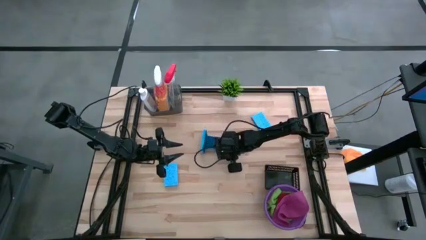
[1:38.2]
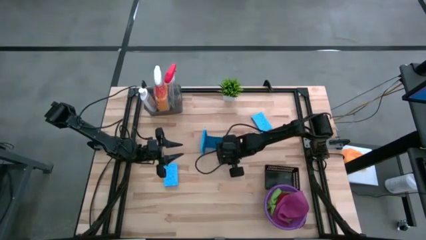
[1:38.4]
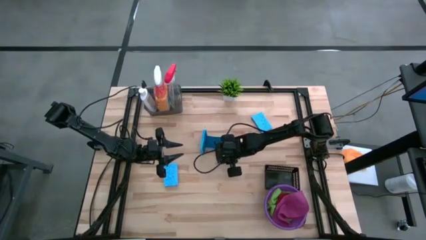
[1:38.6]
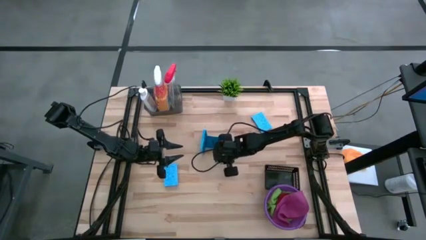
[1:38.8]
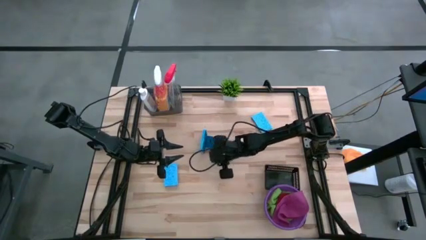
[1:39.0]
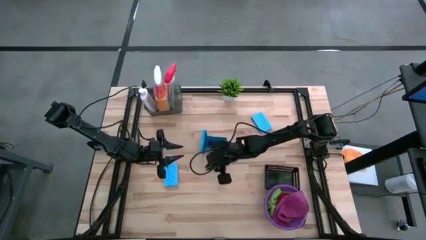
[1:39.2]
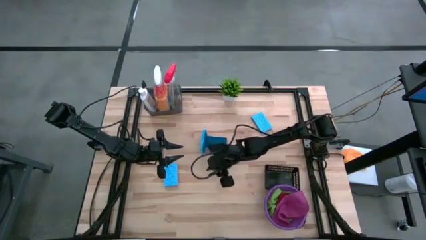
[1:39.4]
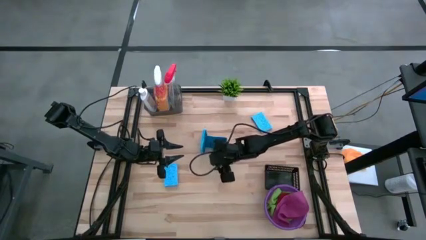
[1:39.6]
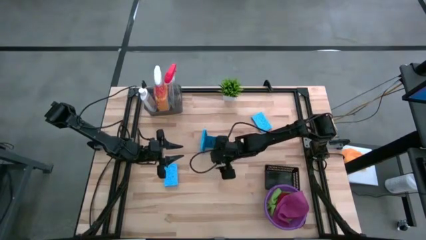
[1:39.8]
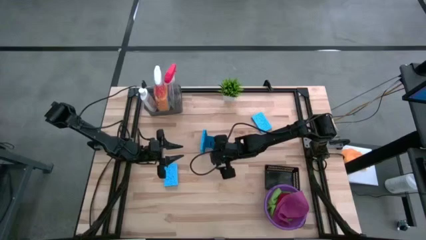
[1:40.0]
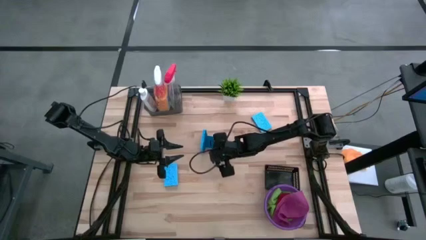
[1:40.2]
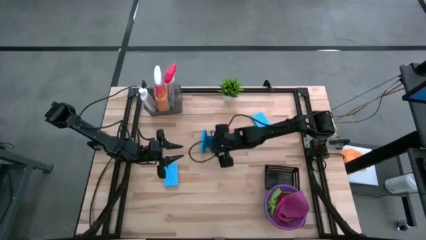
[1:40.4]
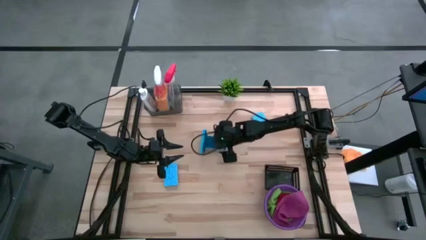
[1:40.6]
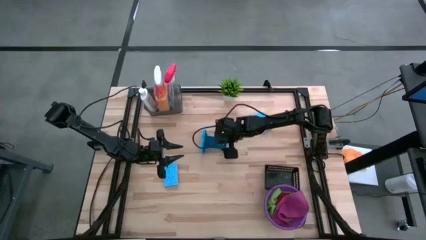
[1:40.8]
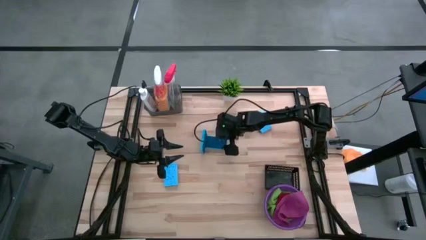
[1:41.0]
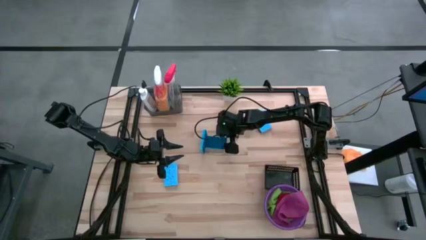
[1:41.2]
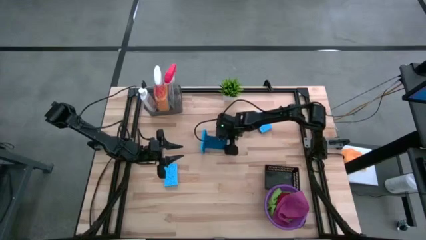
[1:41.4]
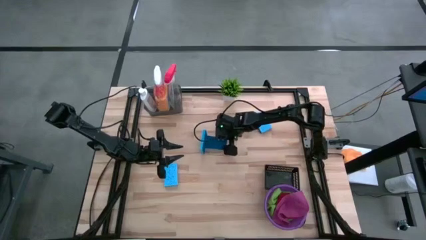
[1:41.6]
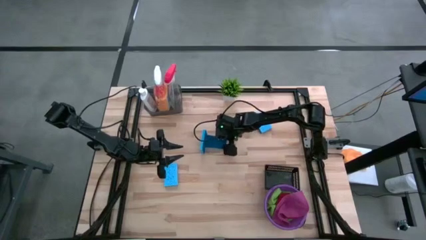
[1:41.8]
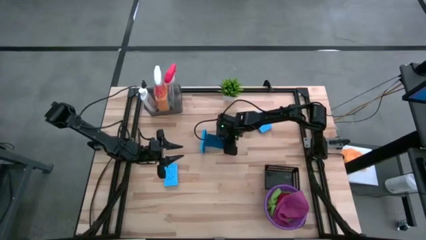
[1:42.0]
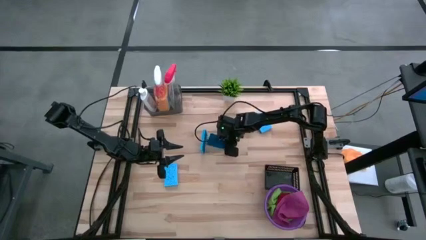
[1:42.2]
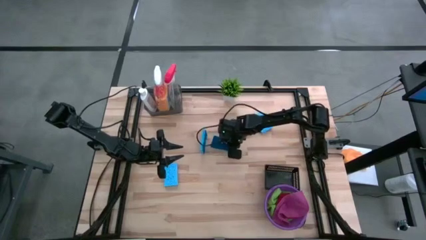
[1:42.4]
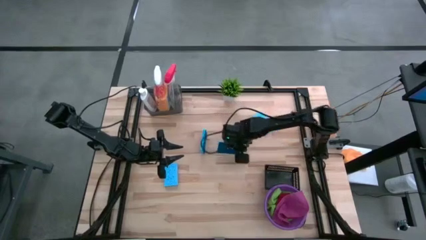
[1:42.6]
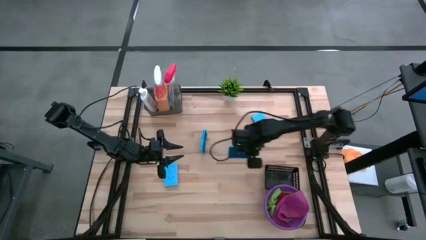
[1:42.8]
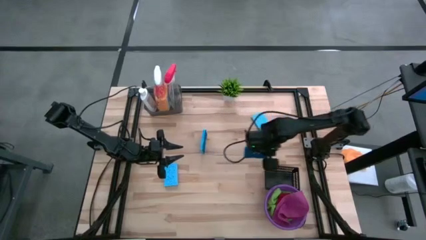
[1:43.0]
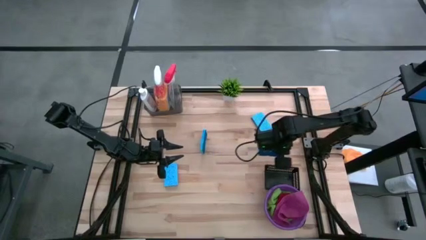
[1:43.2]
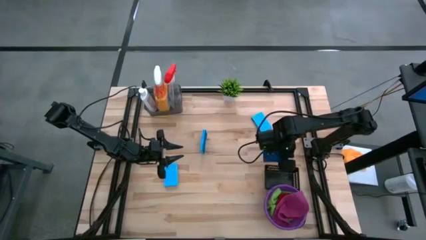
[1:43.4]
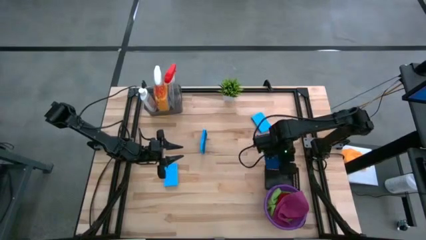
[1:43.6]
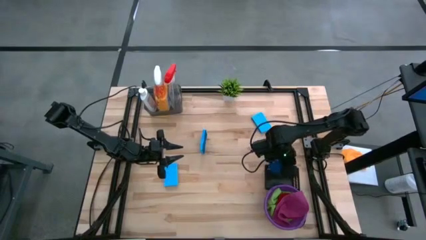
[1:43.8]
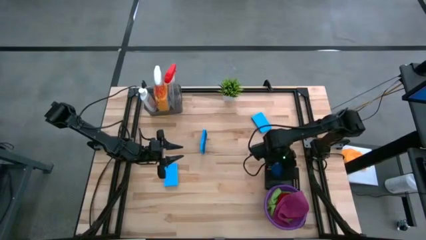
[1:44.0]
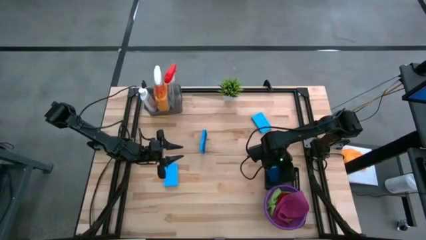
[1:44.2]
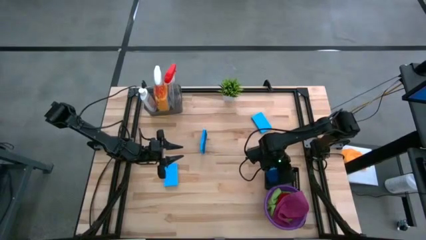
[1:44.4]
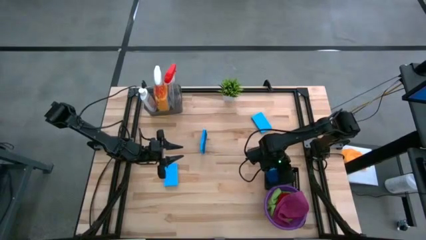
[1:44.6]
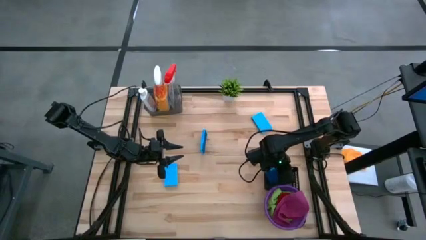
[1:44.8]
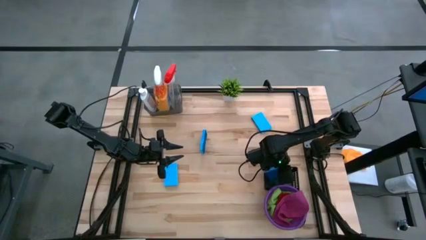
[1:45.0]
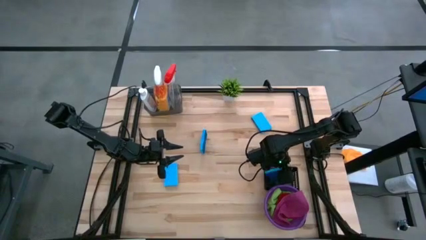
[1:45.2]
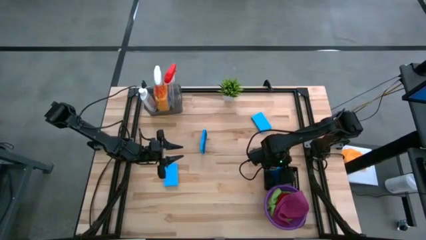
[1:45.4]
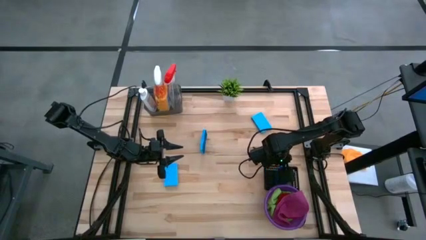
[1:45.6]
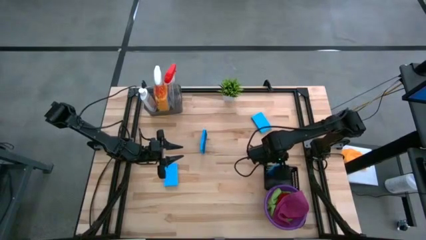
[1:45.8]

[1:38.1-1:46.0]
Task: Pick & Place Kitchen Items
Put the blue sponge into the black bin

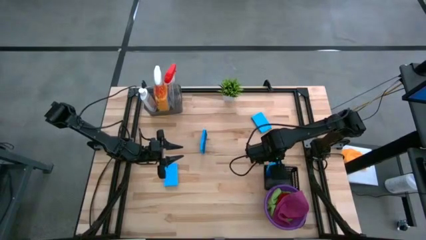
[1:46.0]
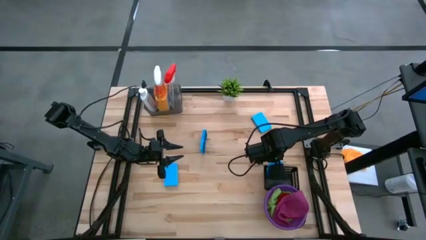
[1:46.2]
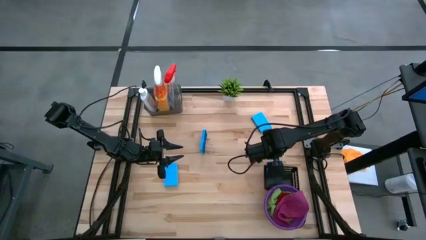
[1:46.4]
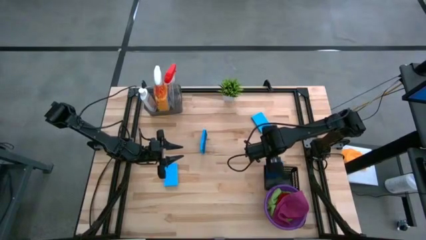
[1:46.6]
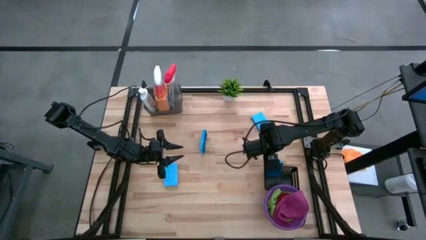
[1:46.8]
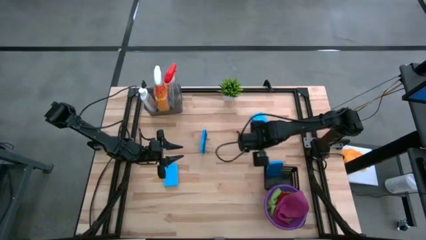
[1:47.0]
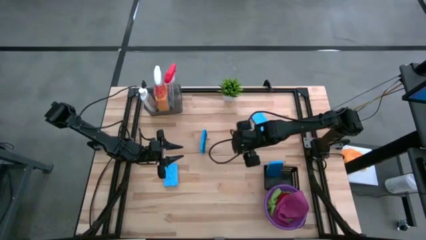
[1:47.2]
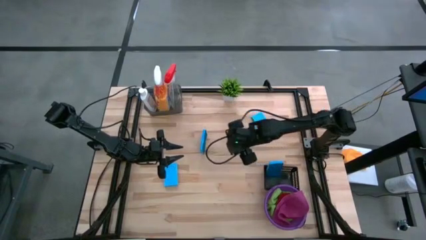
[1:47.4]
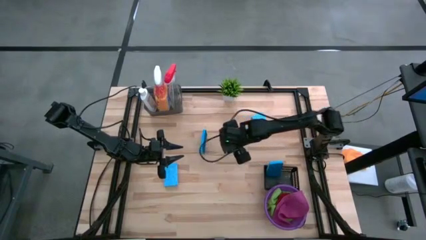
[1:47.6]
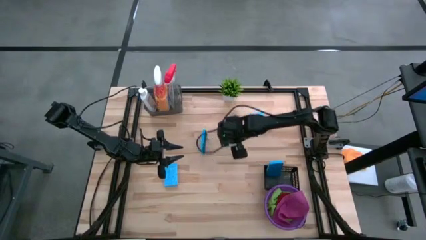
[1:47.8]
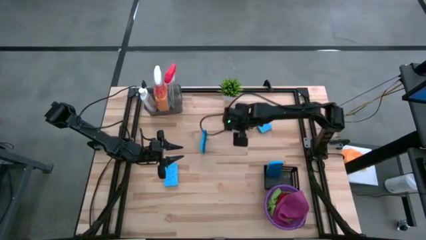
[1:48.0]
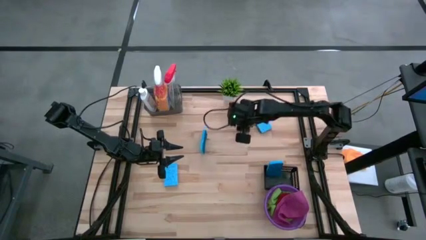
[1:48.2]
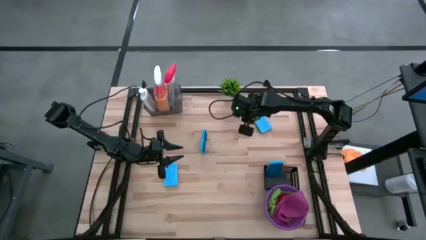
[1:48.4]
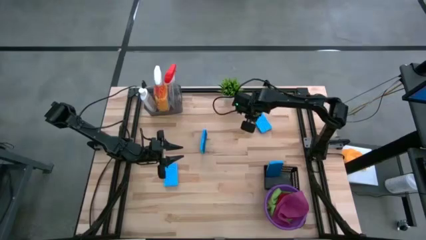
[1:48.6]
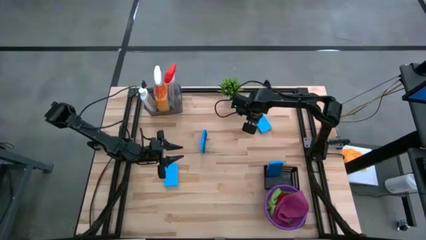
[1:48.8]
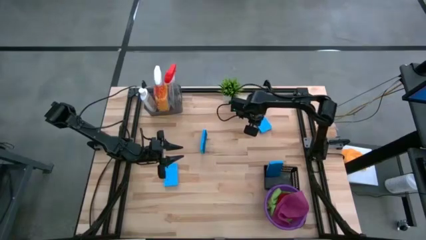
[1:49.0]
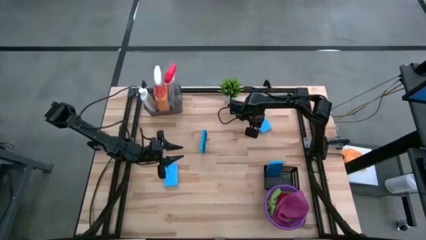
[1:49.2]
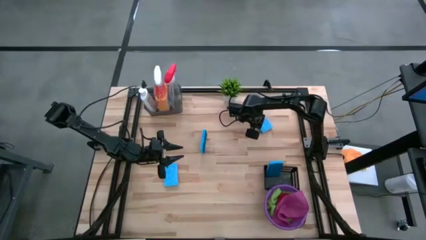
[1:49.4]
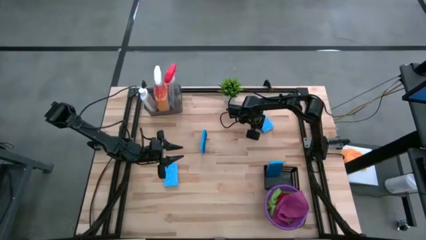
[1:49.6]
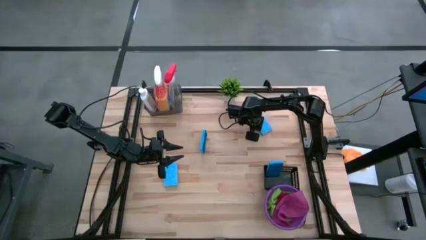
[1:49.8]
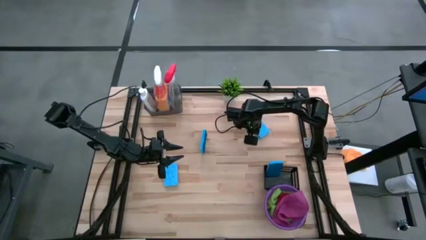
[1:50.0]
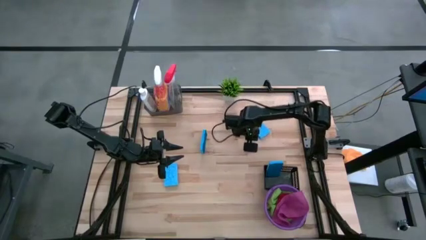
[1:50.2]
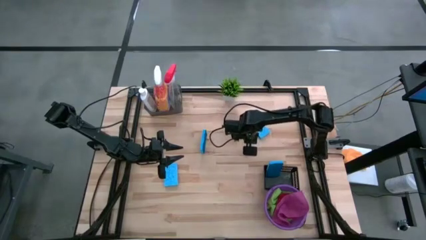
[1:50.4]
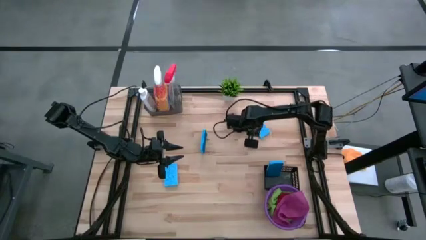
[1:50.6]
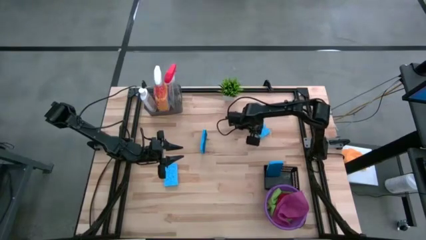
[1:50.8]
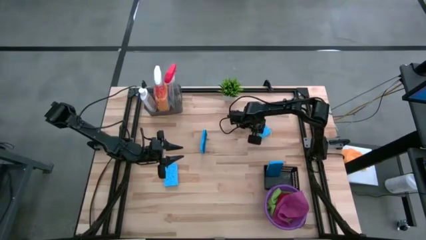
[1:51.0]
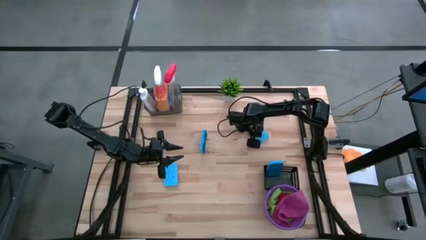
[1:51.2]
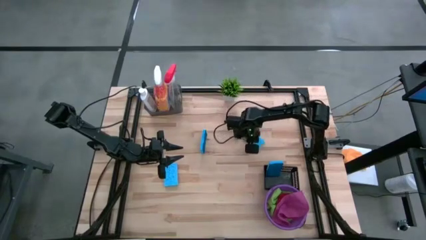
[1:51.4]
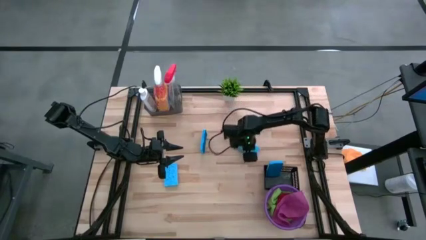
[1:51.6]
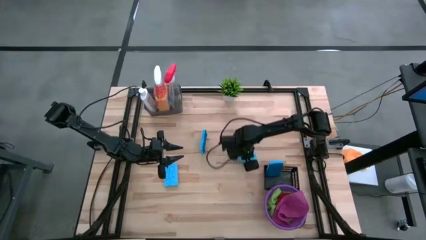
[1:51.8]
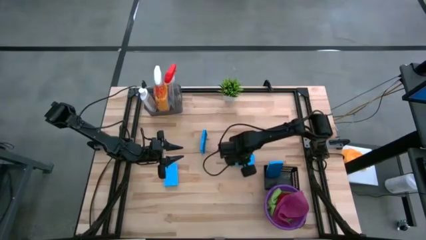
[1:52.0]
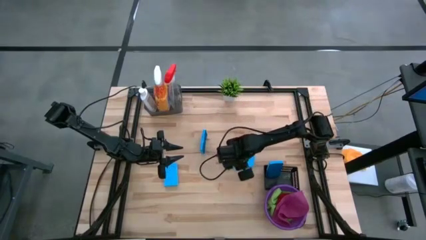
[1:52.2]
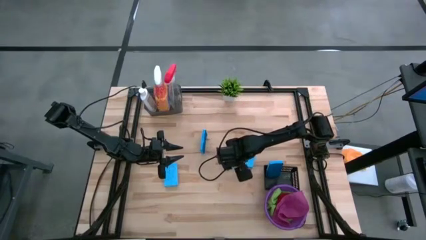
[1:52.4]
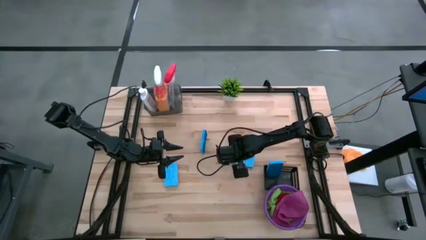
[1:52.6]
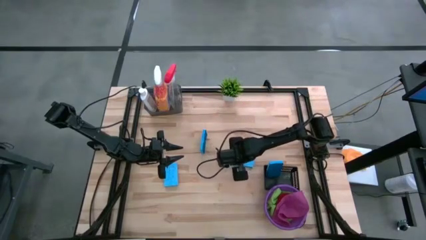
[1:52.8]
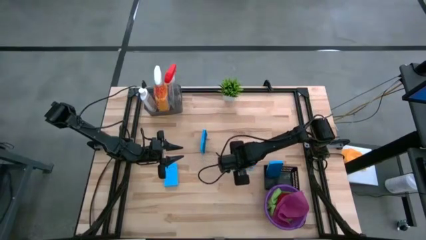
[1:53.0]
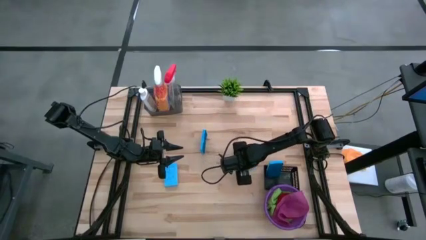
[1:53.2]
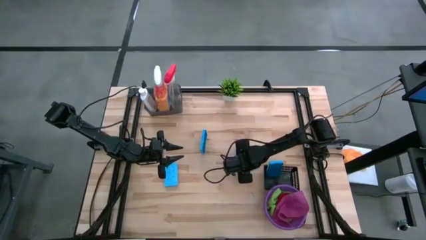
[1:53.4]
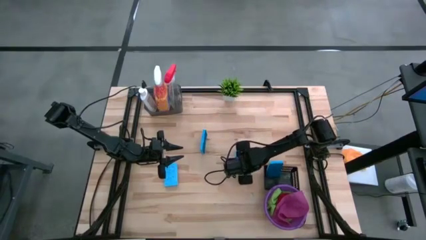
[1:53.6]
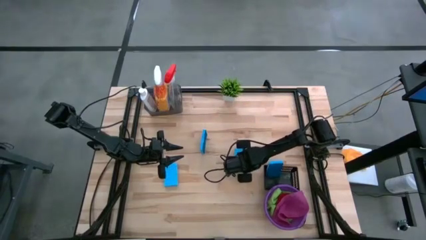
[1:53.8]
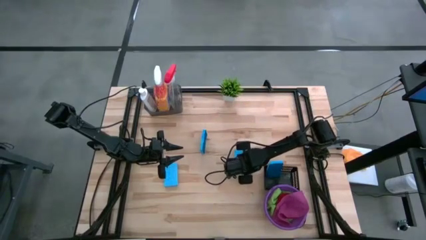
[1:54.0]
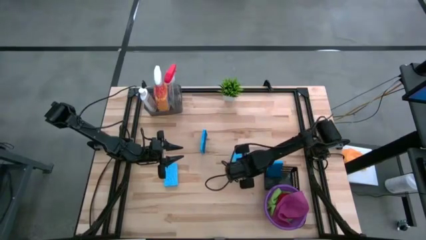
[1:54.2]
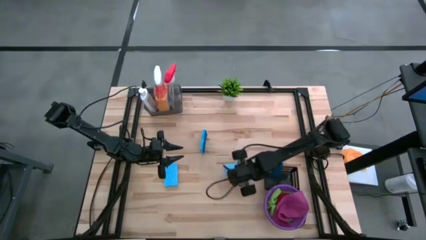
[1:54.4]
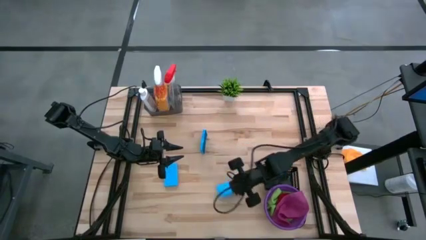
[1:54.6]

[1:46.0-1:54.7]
Put the blue sponge into the black bin

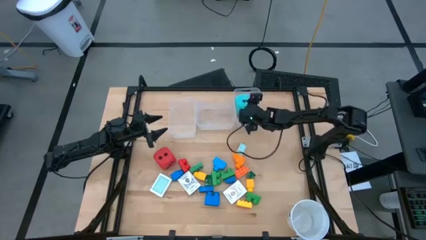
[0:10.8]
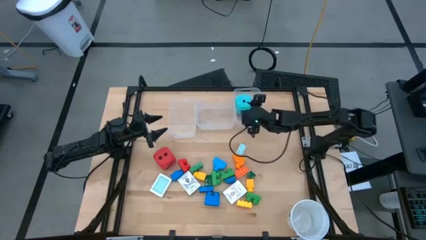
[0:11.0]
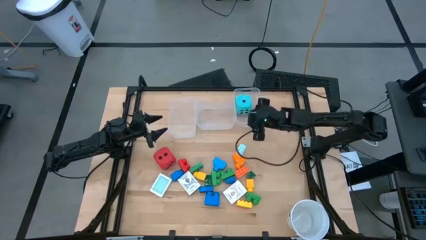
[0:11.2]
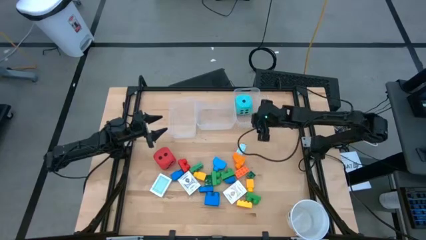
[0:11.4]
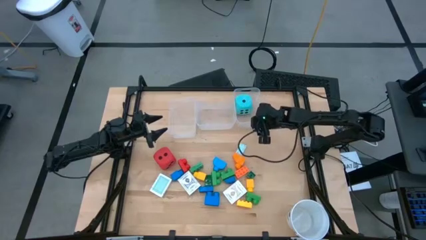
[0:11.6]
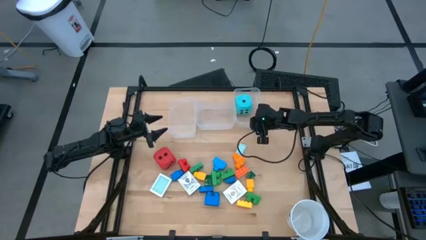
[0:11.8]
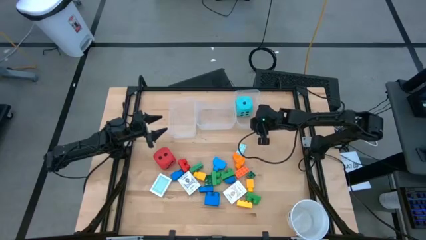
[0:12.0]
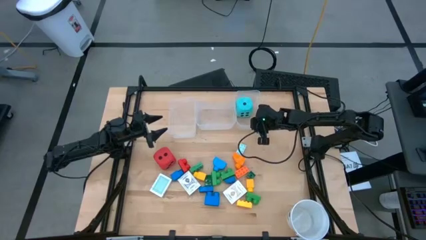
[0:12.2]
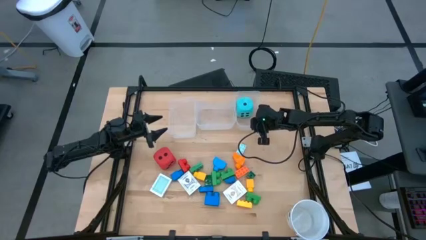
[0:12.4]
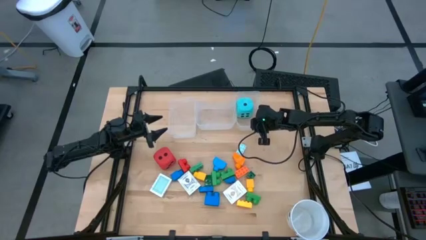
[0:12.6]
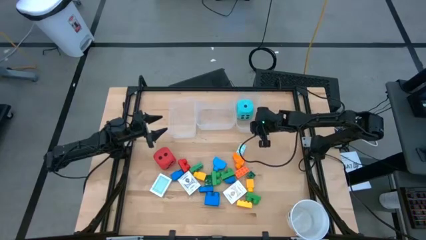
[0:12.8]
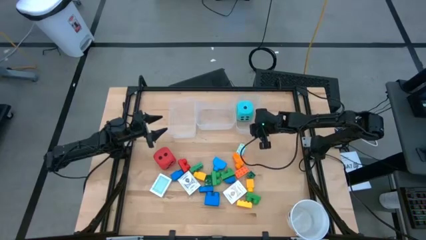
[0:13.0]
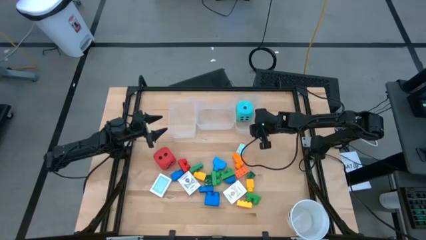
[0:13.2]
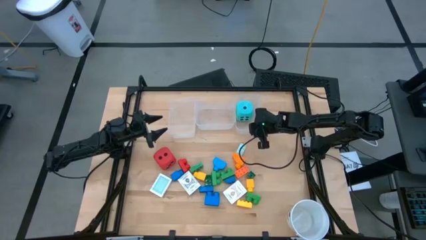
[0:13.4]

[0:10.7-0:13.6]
Task: Pick & Place Toys
Adjust the right transparent bin
